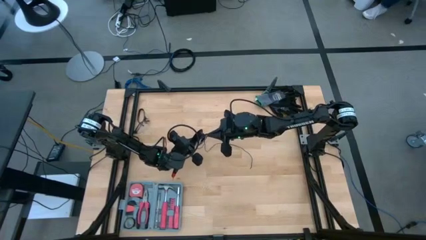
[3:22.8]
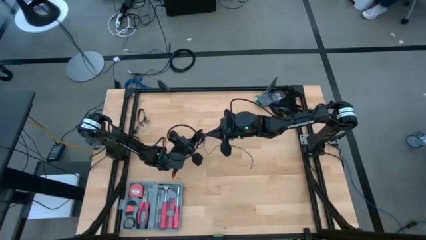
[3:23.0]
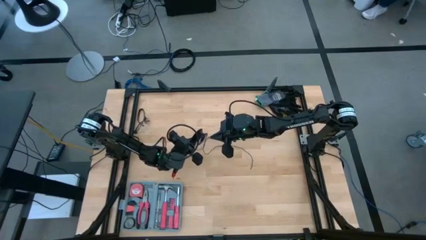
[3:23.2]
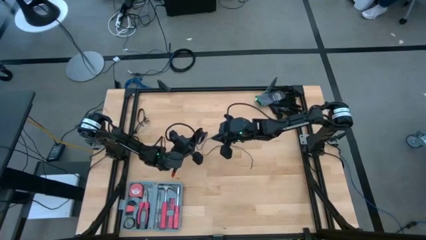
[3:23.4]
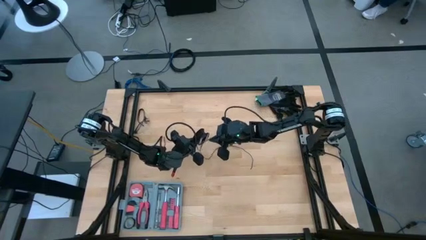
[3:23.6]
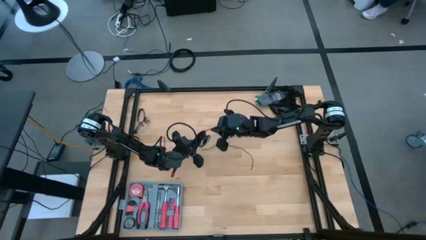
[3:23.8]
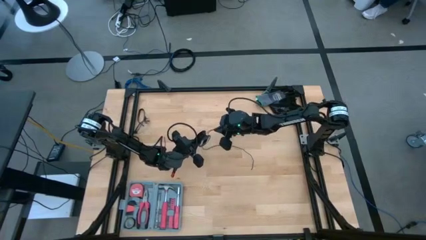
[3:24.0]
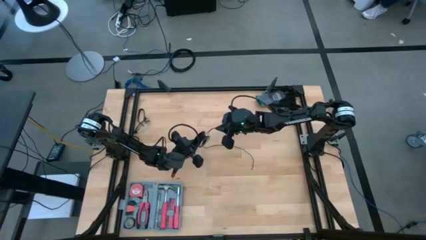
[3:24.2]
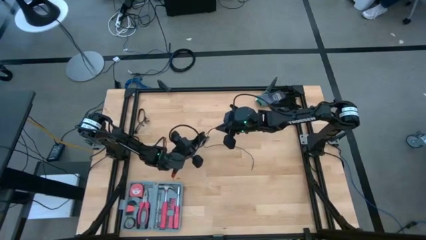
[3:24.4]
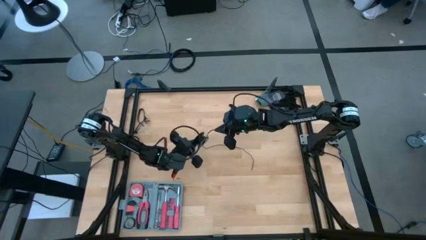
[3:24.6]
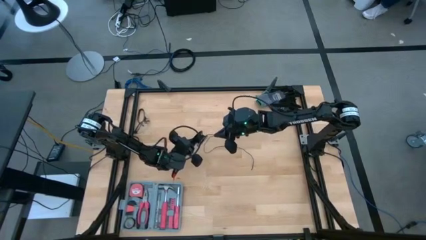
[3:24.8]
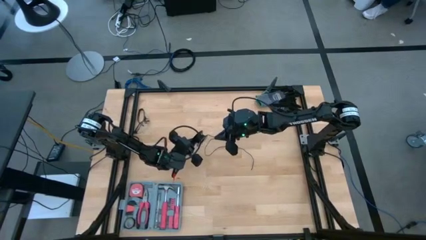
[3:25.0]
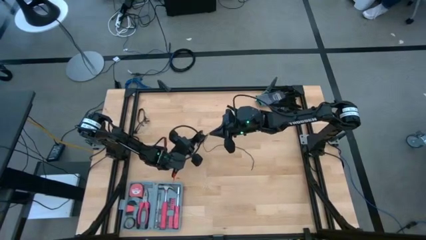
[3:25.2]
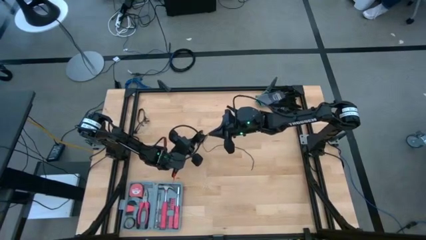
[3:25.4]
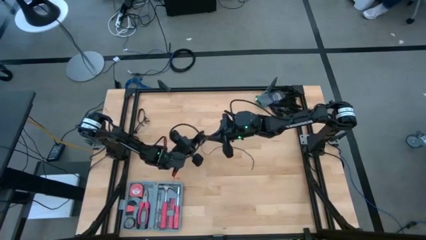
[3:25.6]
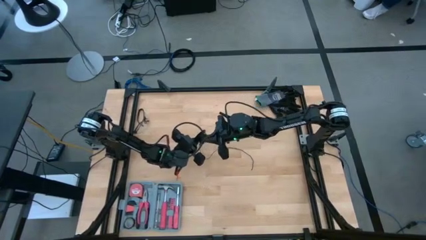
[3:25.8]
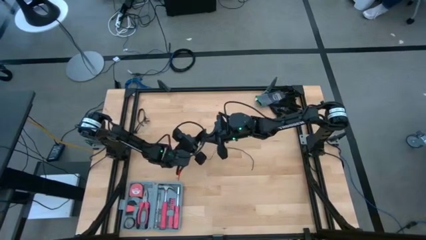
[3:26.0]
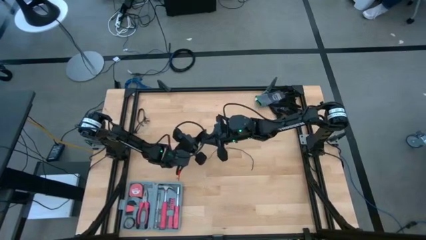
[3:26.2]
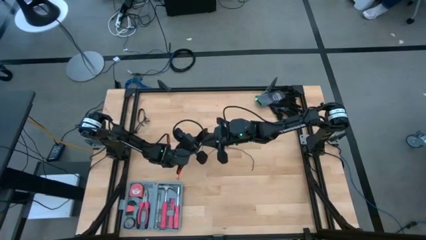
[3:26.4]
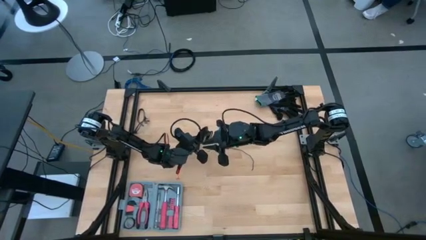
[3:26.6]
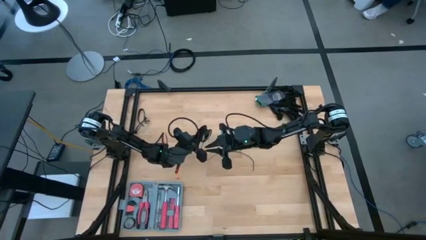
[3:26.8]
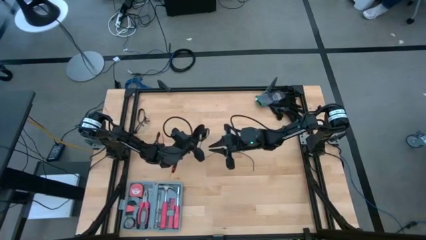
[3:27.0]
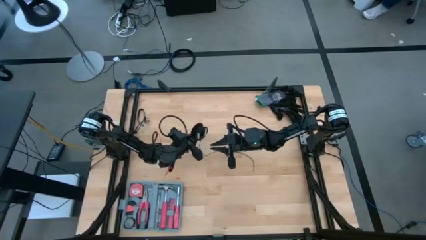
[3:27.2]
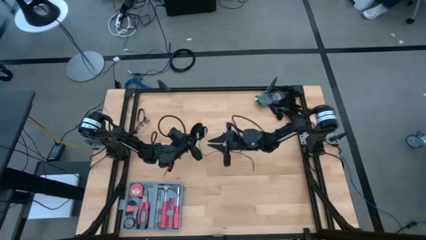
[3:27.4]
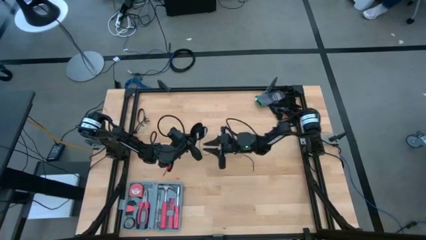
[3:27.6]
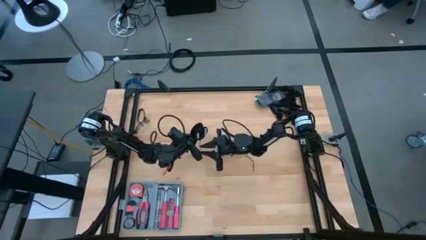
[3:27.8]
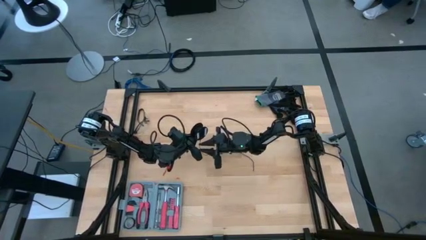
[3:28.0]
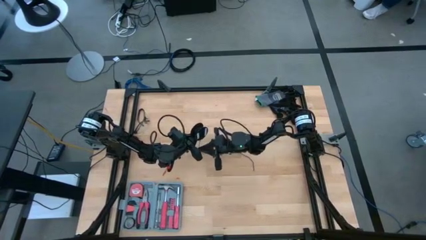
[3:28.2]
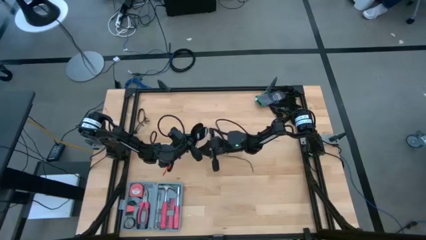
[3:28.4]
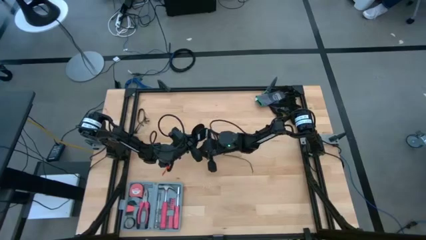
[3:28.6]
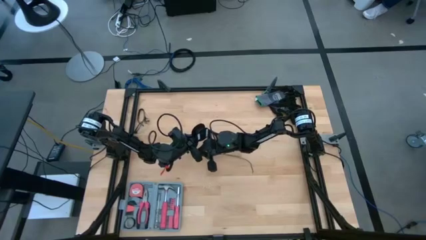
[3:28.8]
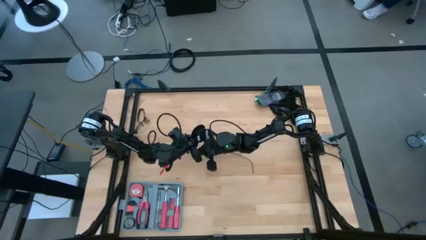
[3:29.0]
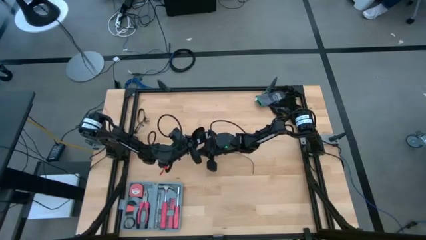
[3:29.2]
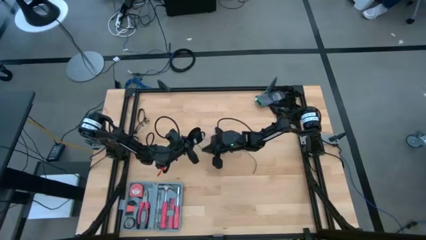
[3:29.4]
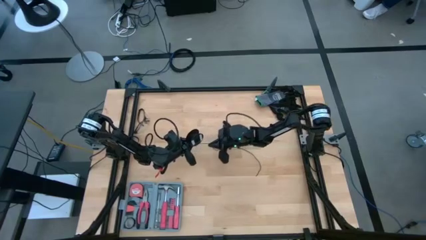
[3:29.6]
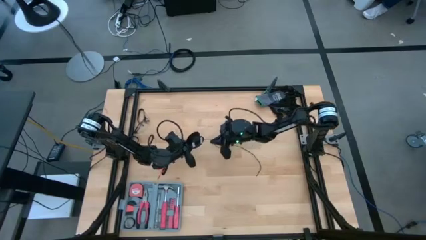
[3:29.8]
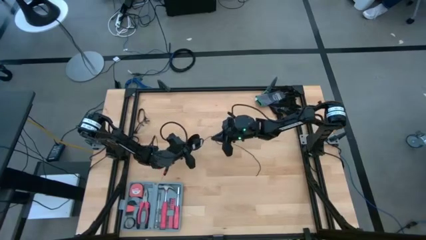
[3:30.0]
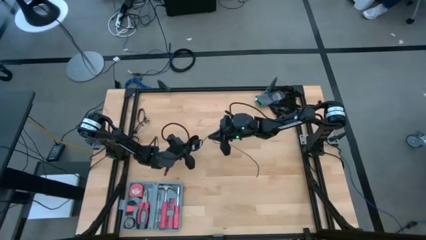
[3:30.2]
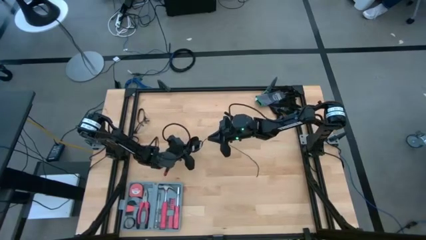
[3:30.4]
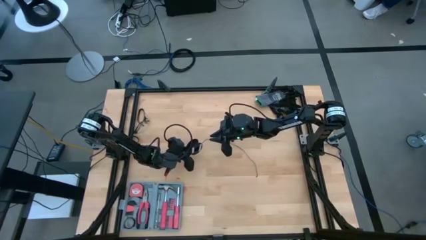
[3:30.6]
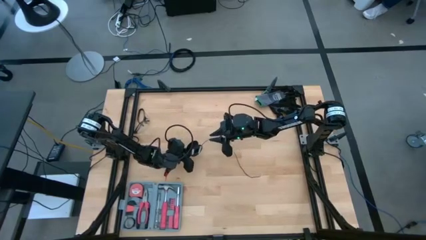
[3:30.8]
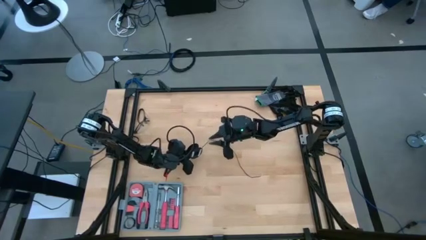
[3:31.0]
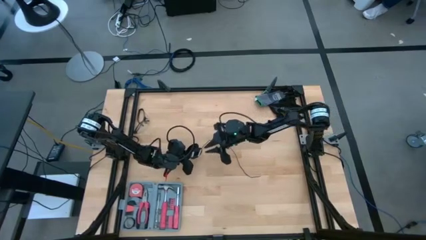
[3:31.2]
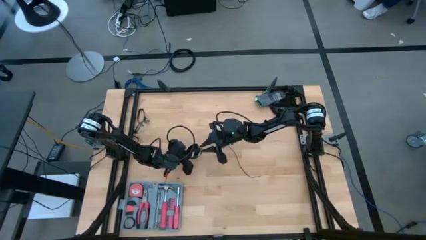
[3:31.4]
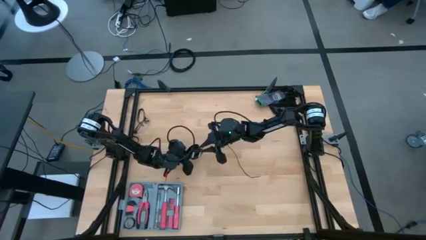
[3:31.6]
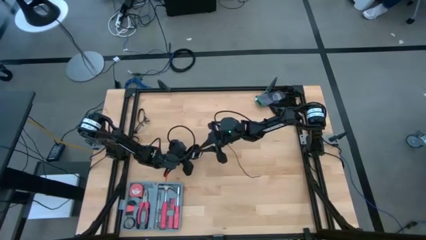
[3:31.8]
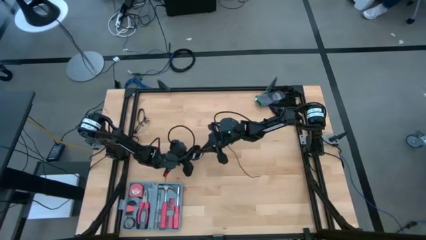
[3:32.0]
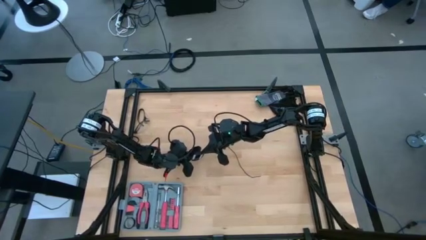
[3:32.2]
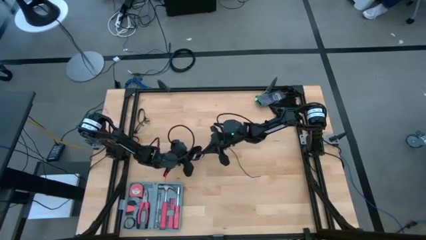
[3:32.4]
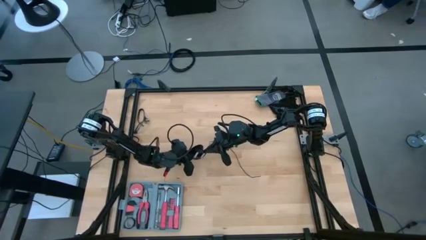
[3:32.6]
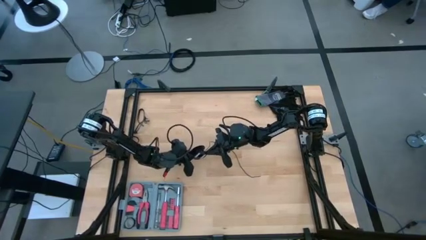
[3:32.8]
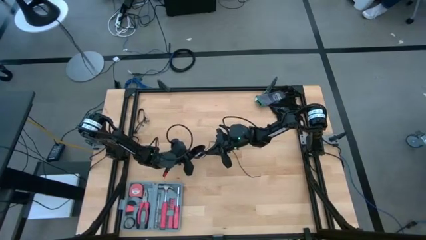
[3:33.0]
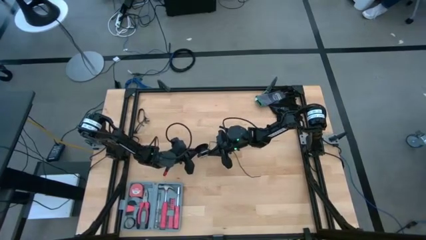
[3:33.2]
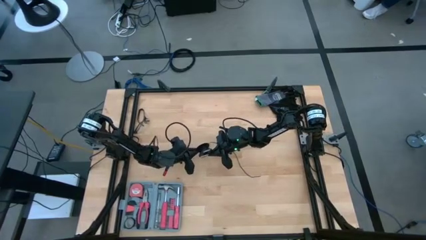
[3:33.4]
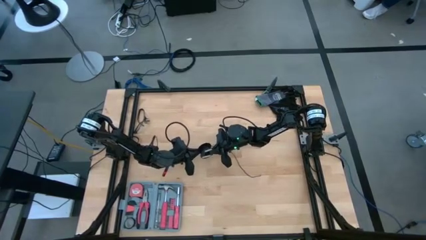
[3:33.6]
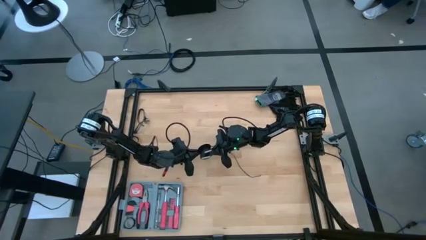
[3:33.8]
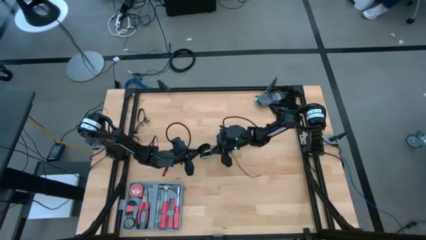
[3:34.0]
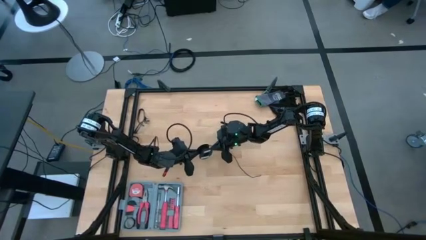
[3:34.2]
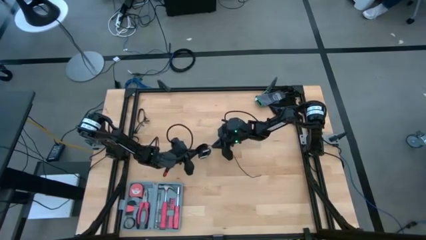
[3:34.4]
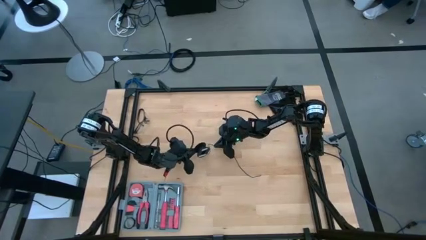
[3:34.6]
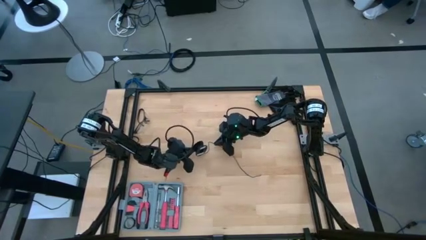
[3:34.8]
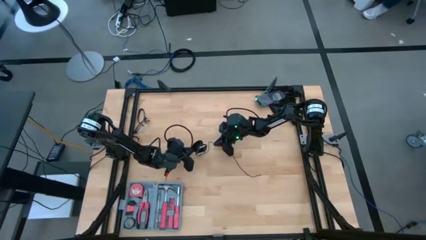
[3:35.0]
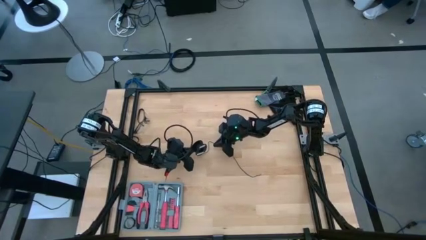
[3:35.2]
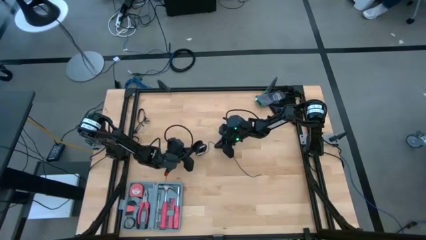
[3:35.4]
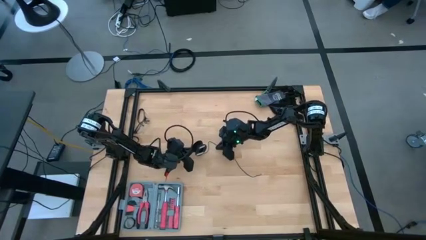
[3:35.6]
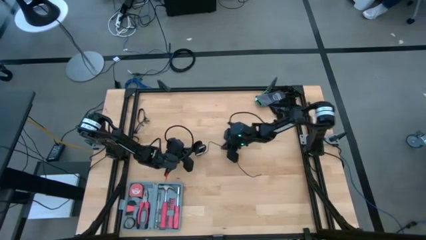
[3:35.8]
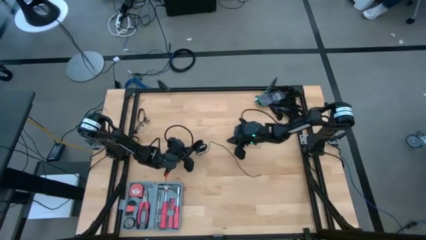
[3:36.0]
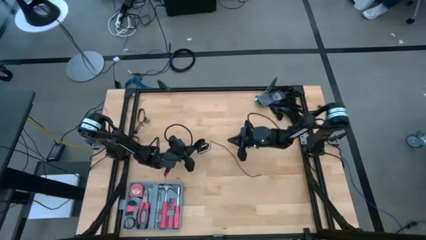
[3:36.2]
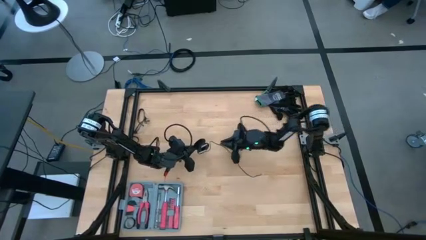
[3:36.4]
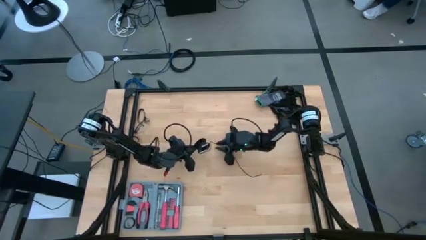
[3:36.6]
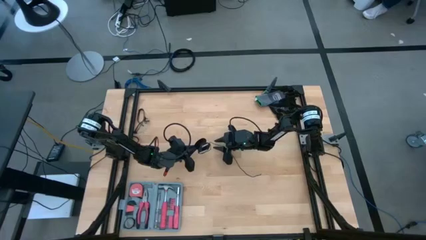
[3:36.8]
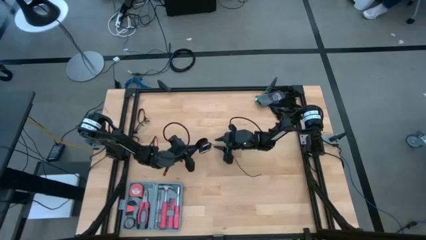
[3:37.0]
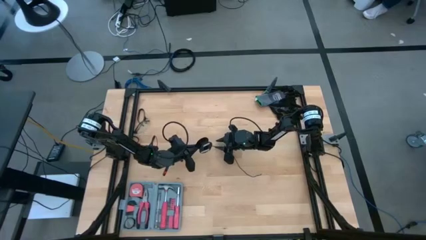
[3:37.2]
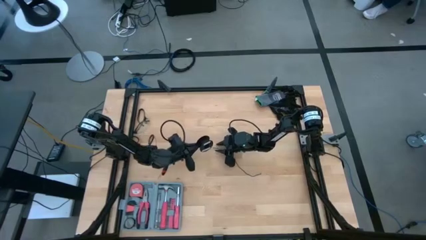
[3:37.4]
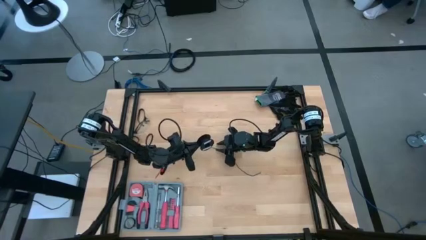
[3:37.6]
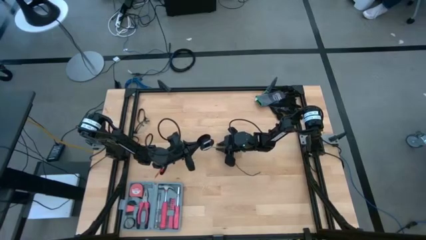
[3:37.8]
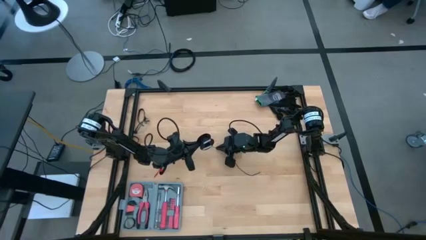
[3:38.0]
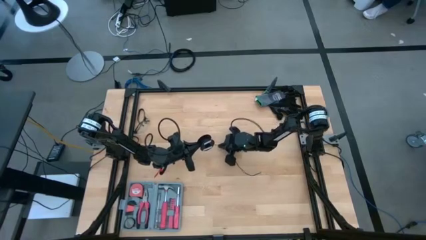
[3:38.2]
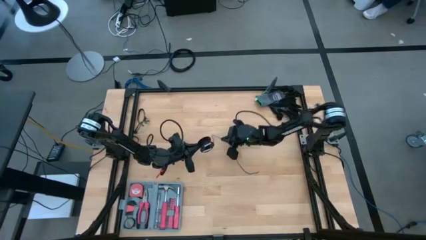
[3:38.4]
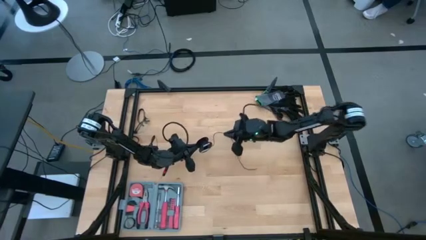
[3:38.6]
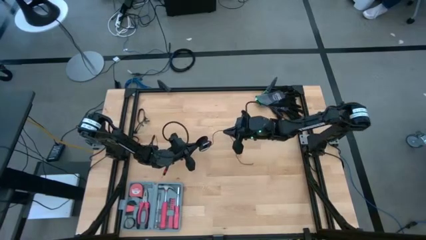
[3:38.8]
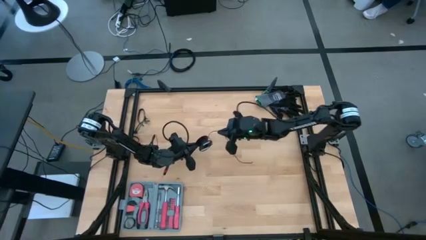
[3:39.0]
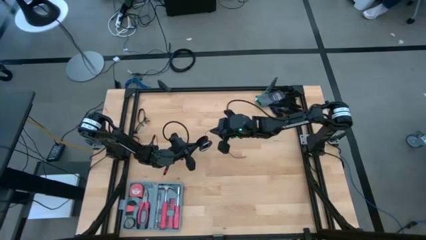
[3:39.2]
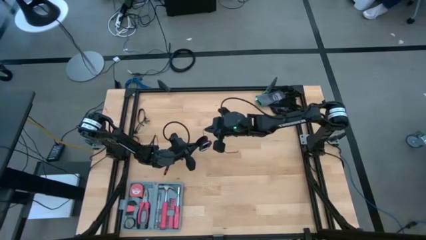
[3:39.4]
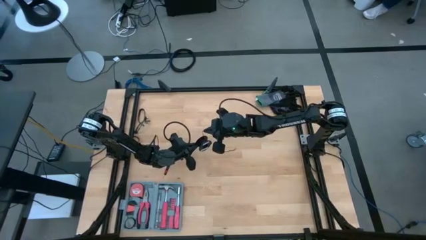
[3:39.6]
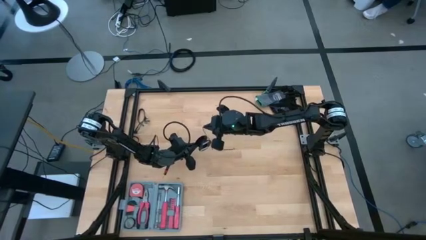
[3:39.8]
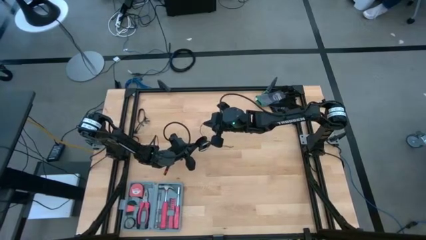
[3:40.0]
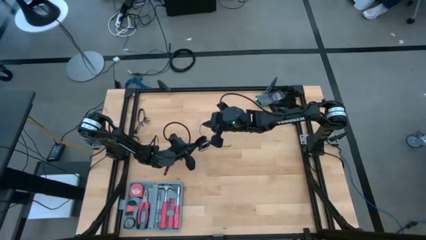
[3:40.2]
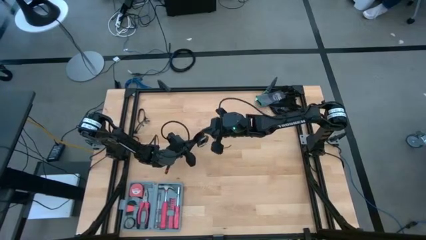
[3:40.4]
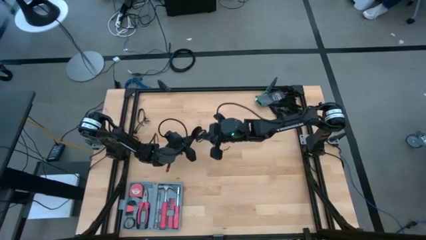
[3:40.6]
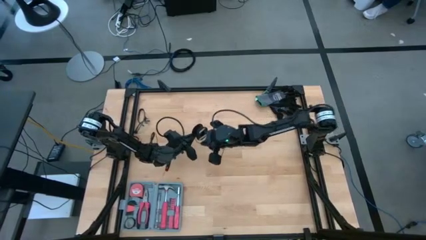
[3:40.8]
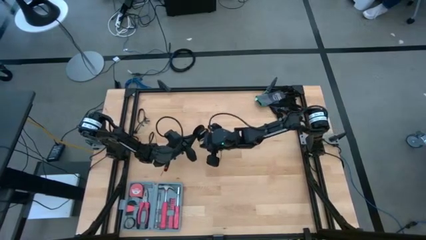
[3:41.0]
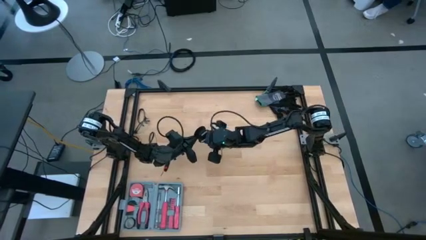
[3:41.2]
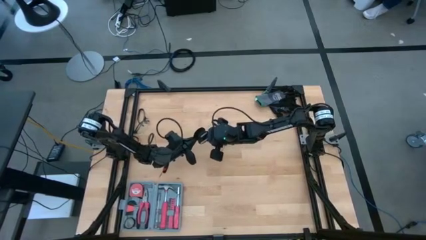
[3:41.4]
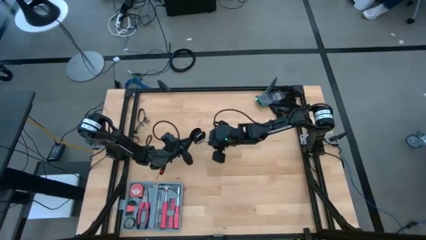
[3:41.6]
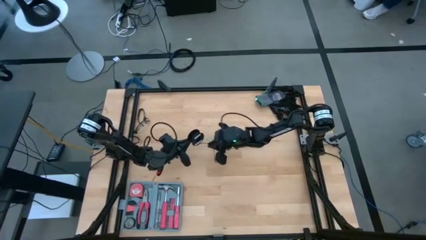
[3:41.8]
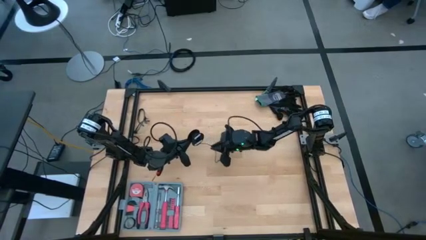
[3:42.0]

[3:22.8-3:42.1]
Task: Coil cords
Coil the black wire onto the spool
